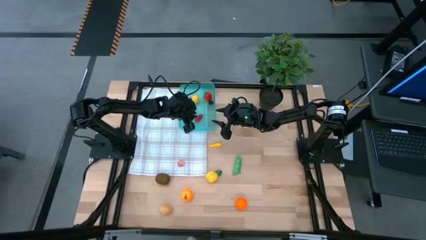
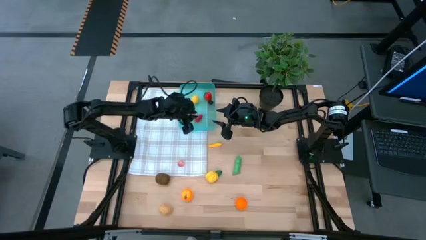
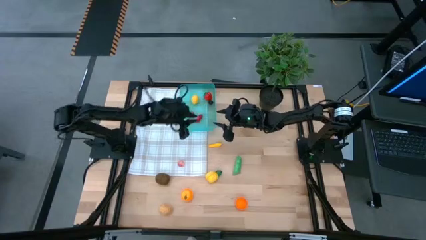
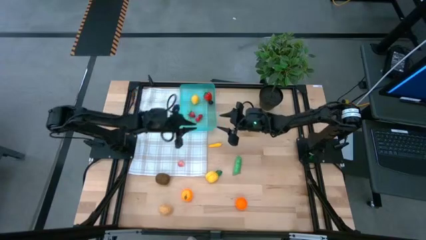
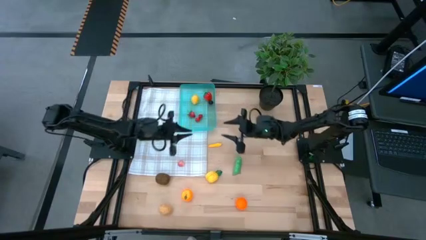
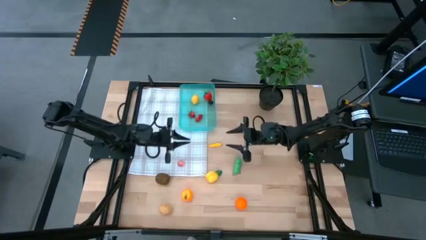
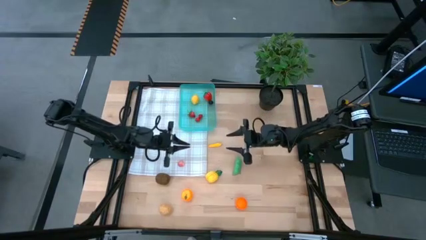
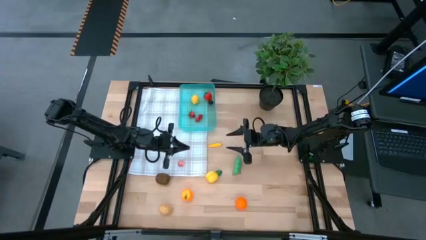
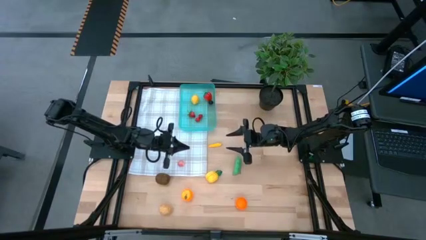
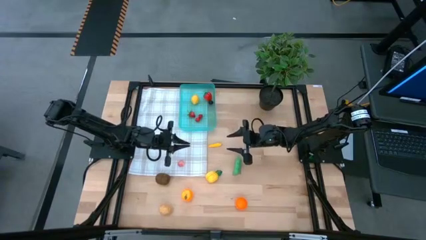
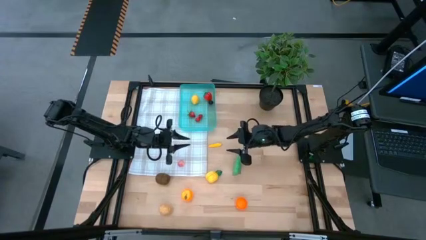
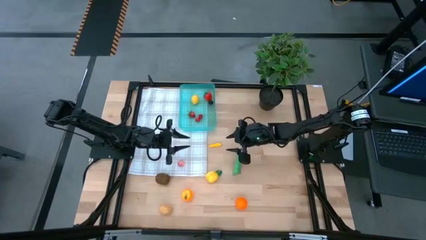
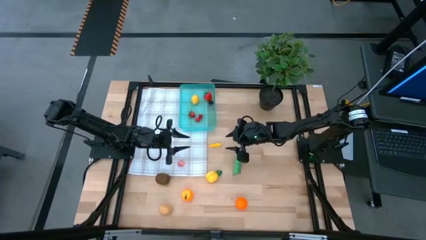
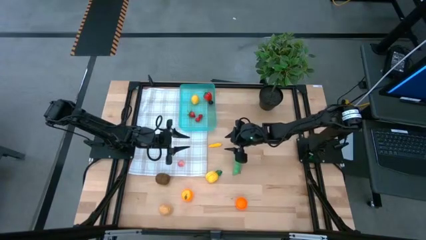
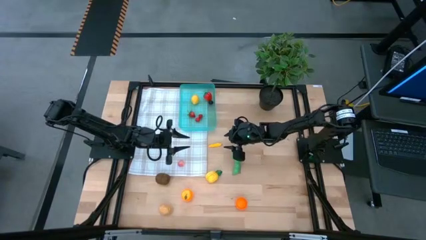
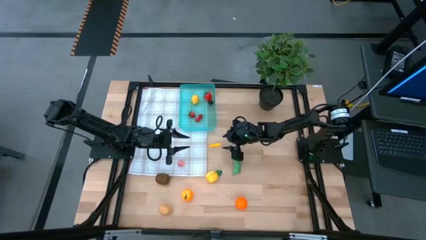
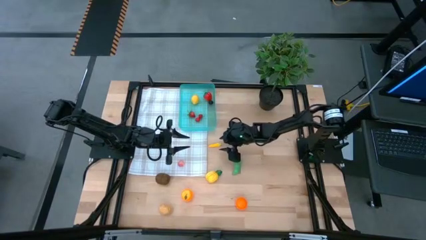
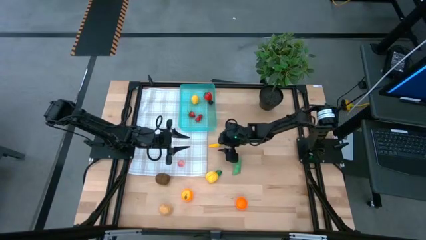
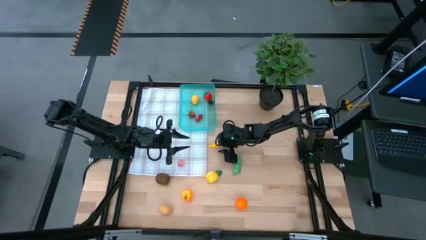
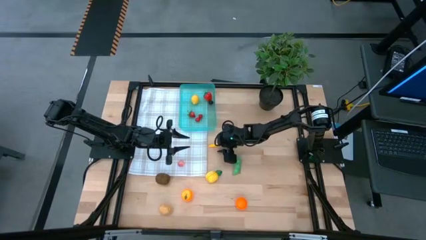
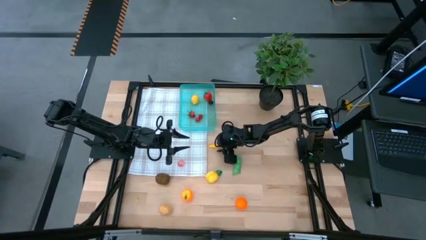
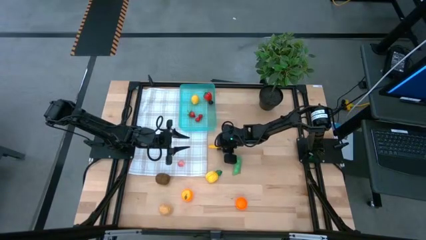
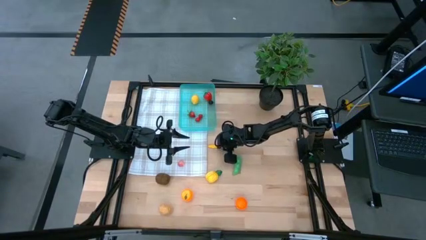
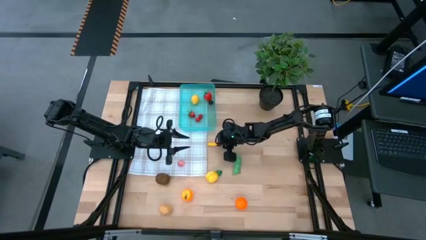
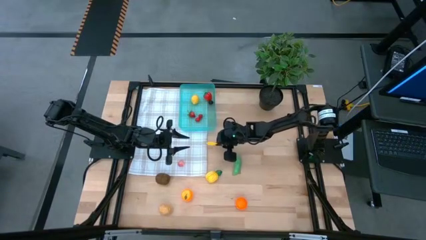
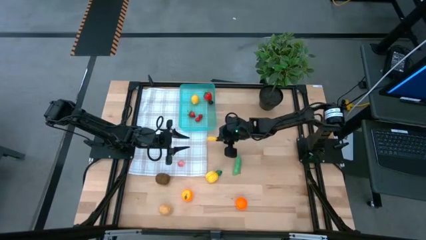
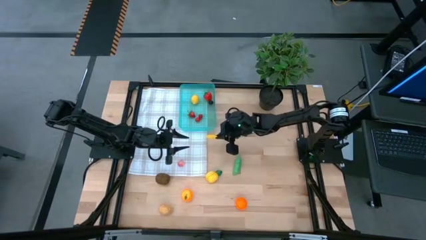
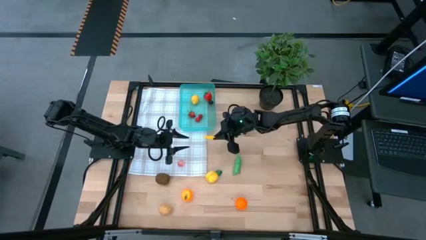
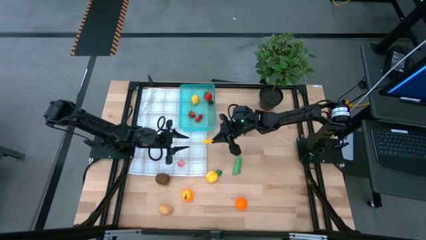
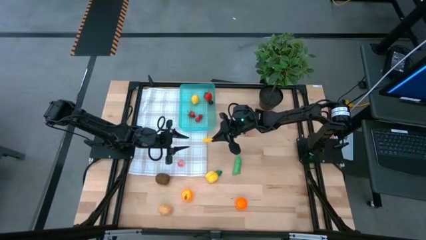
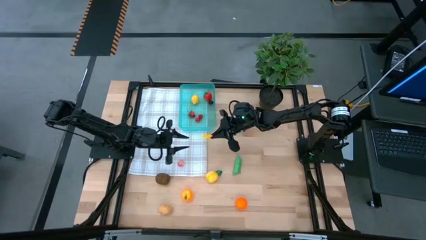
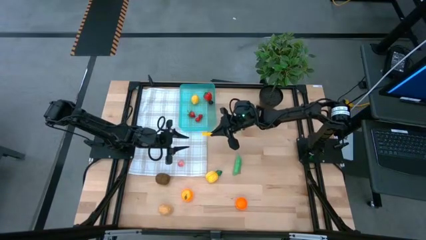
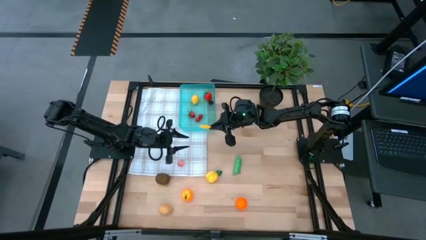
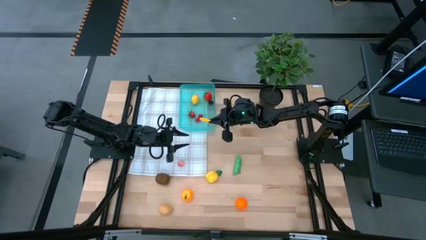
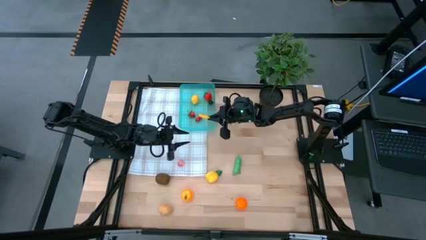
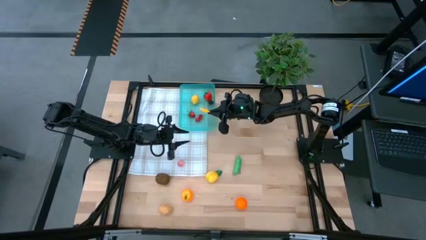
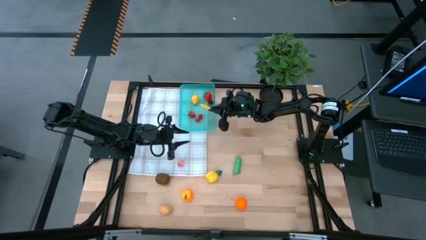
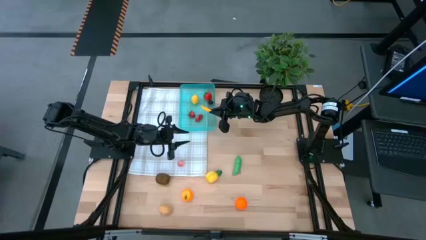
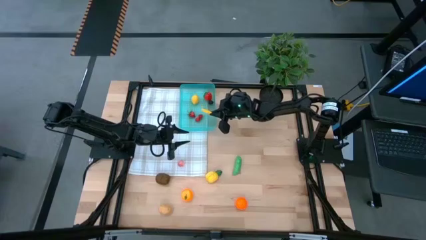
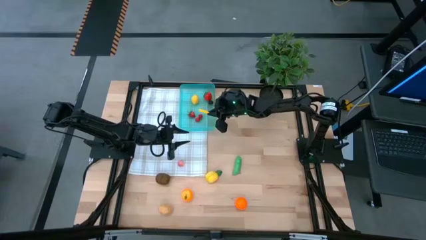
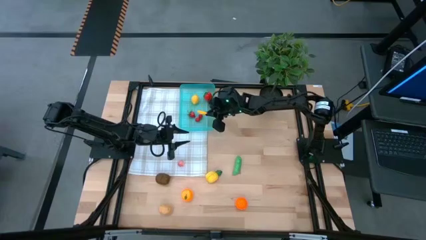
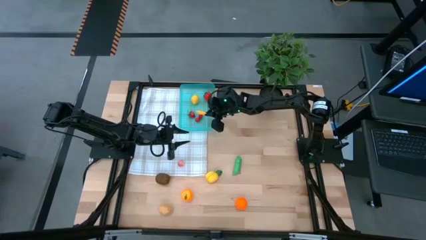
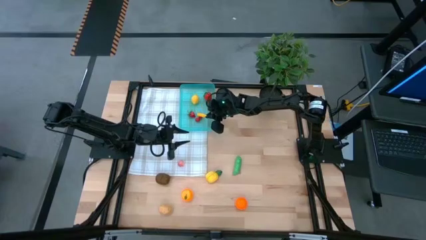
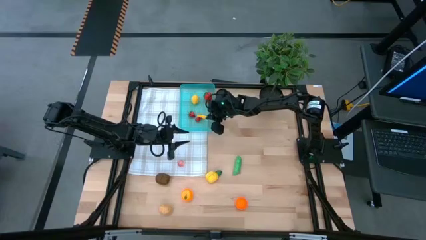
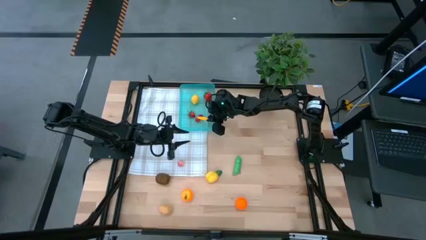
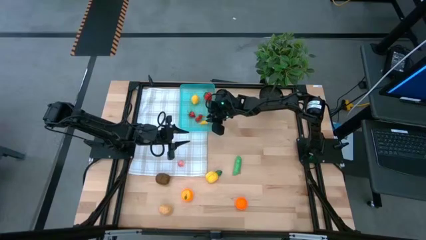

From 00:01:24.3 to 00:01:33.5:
Task: Pick and placing Produce into tupperware
Put the yellow corn into the blue bin

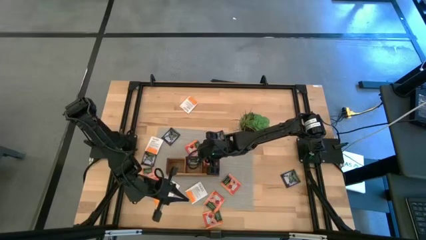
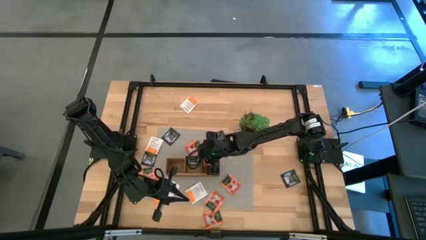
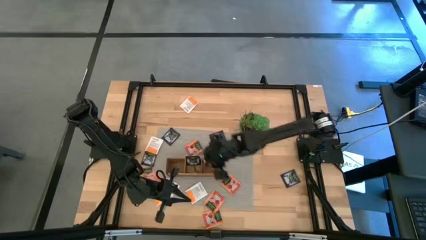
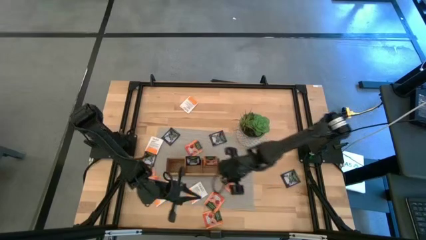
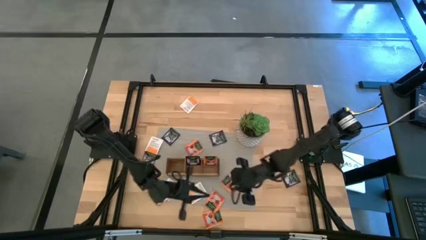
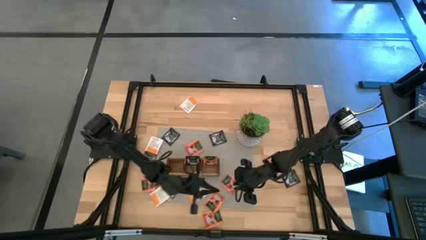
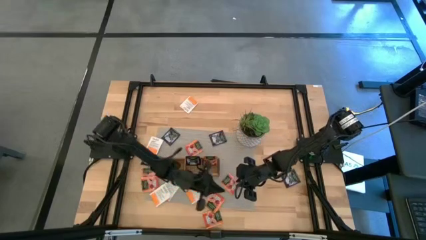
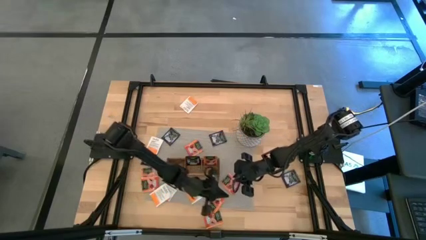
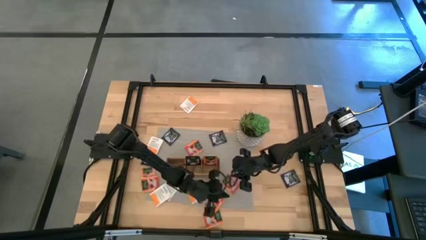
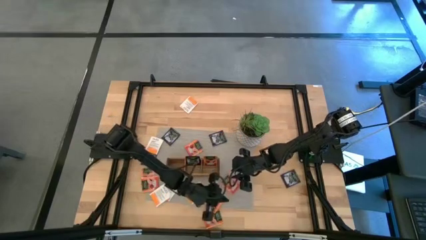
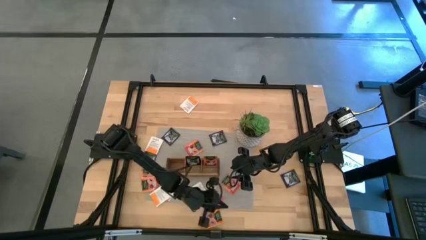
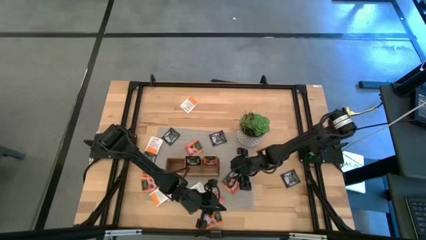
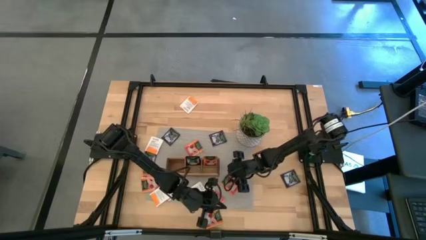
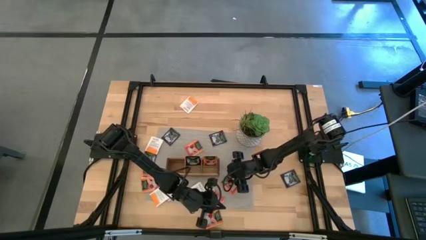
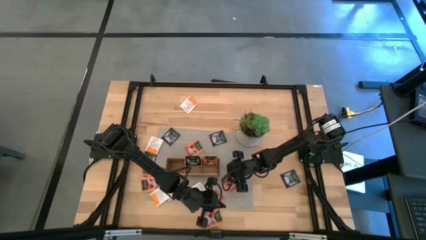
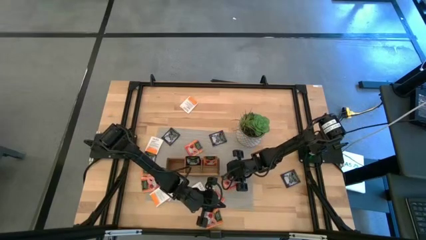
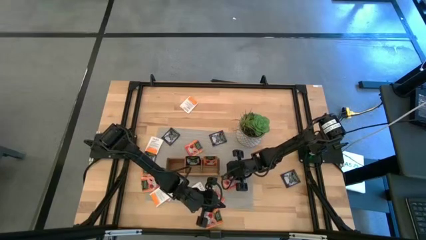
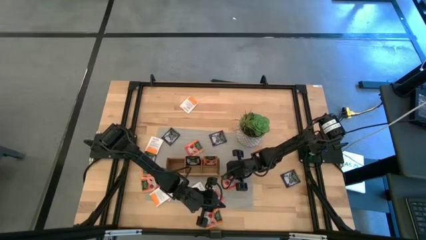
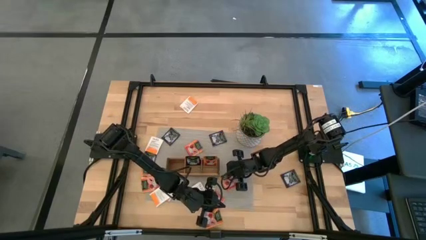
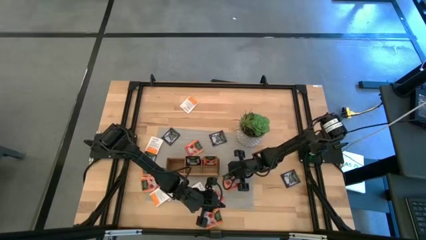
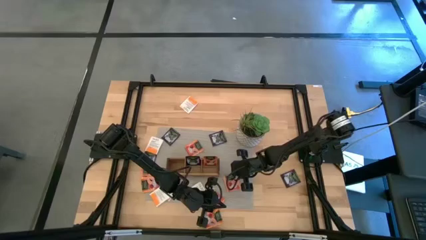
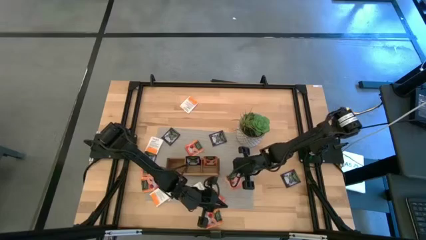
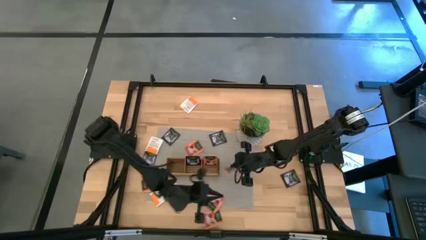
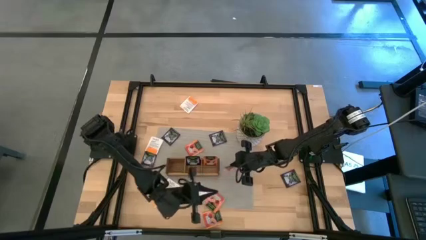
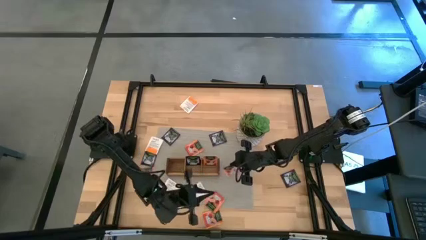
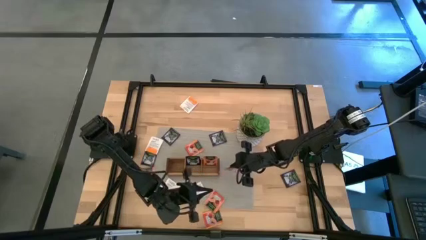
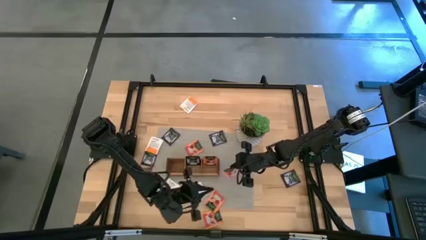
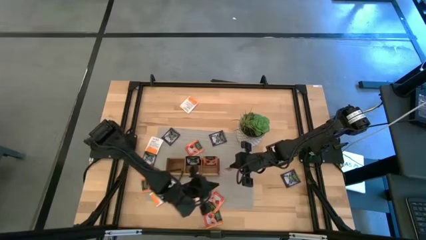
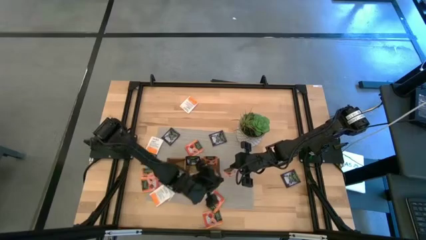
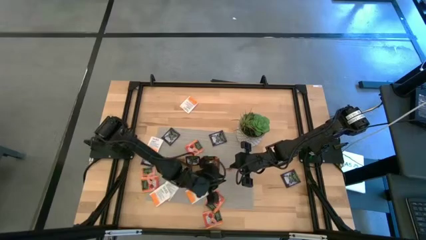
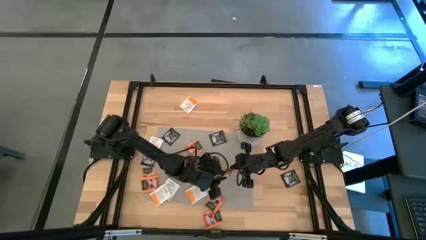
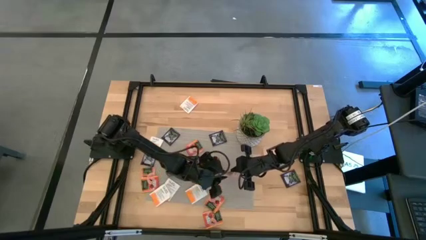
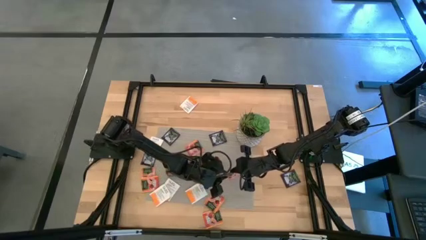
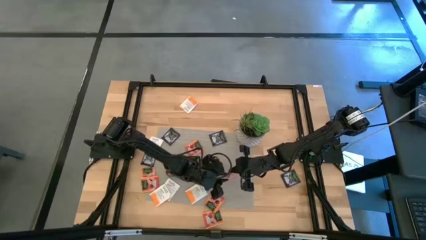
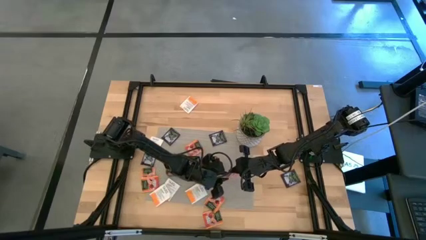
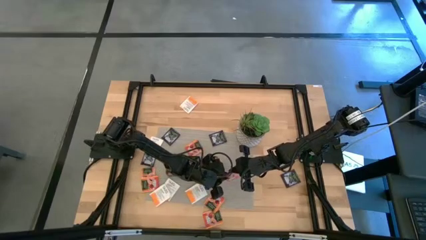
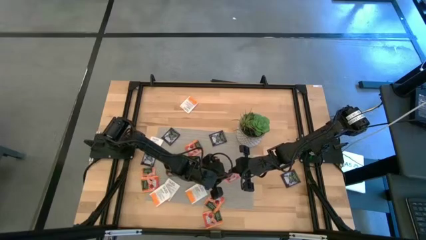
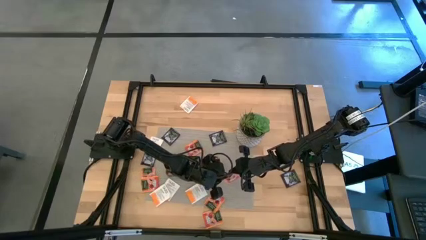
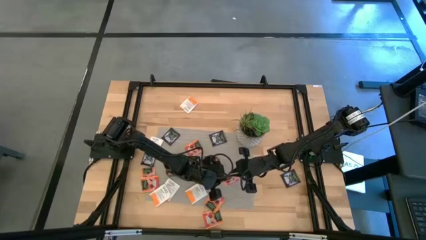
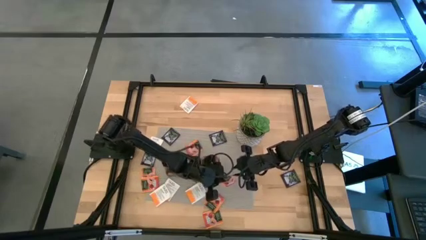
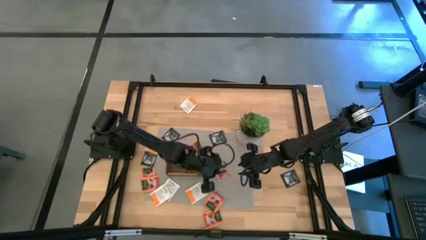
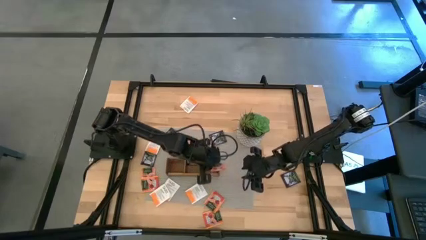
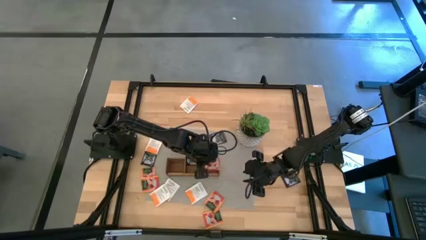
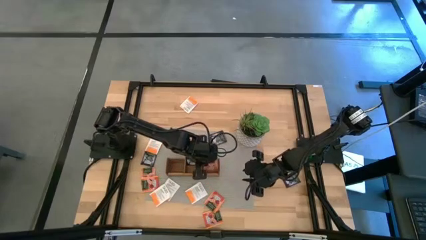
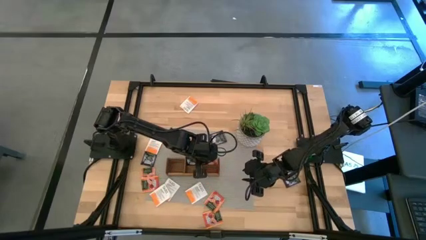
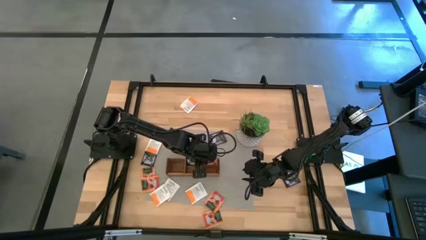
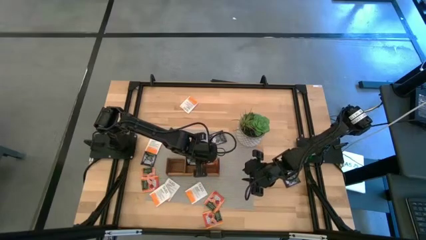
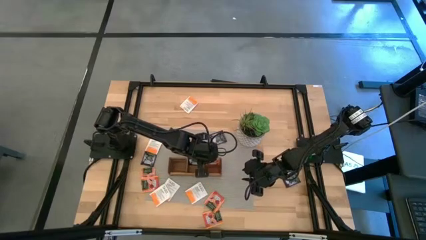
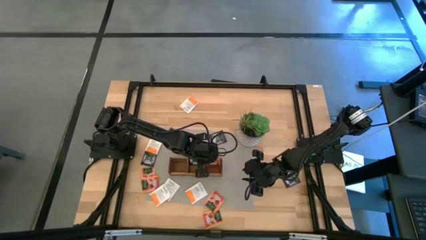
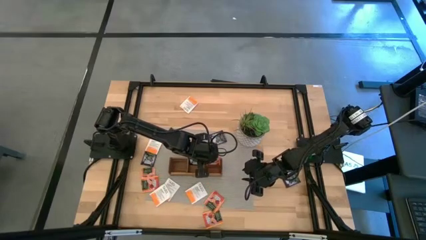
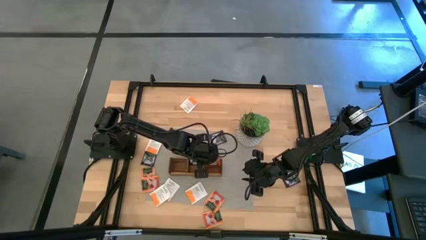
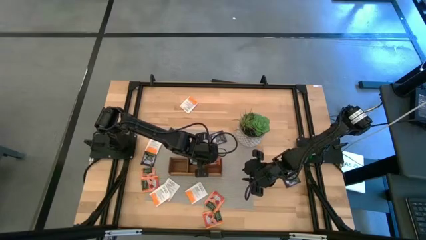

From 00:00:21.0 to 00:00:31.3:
Task: Pick & Place Tea
Put the orange tea bag into the right section of the wooden organizer
